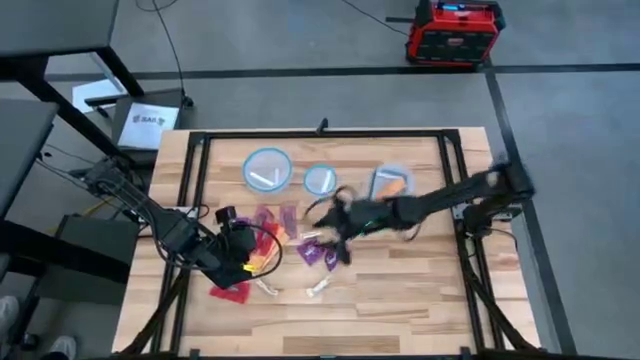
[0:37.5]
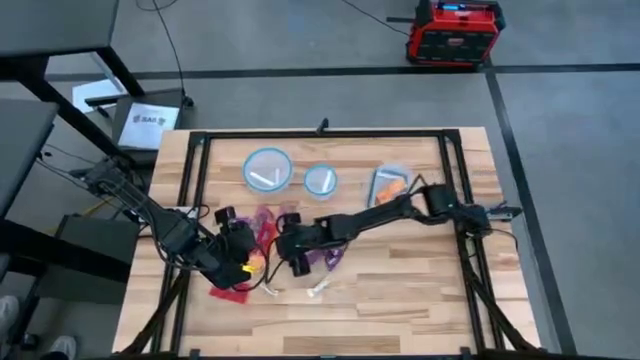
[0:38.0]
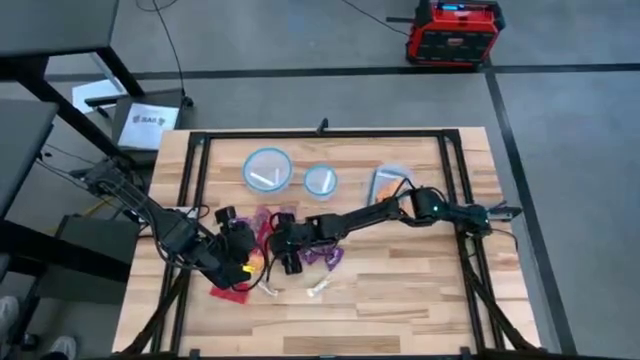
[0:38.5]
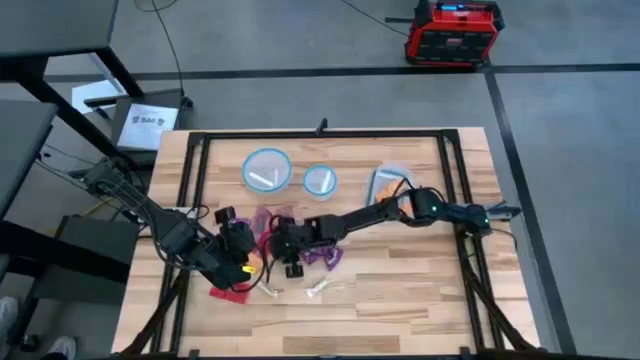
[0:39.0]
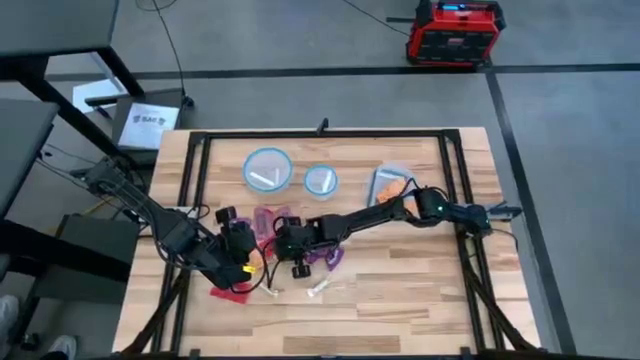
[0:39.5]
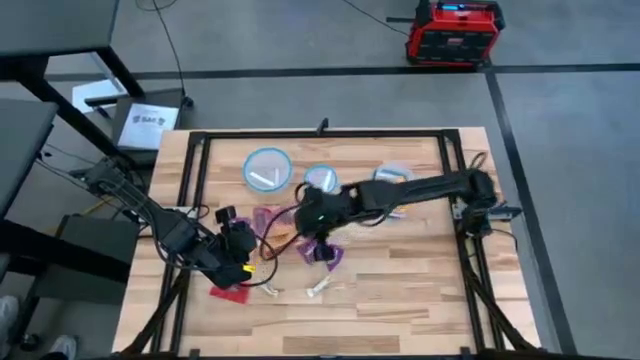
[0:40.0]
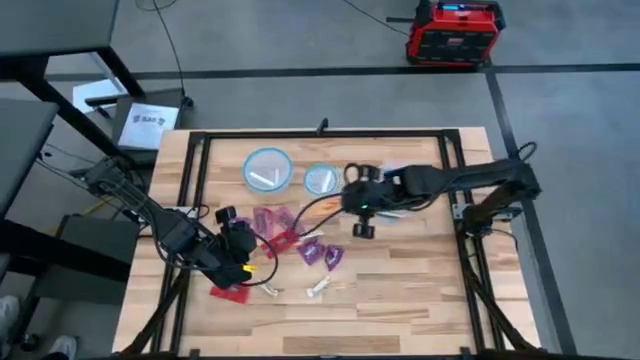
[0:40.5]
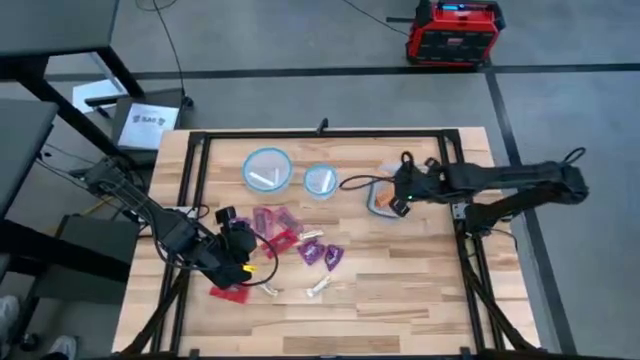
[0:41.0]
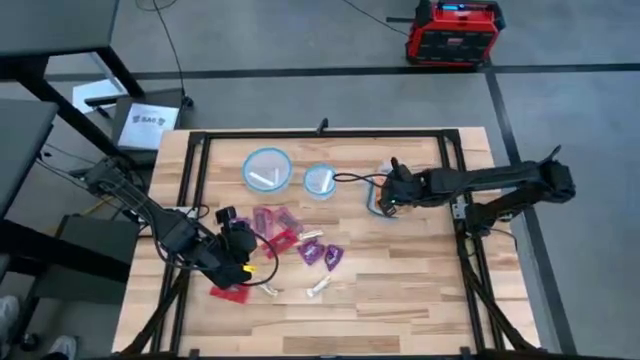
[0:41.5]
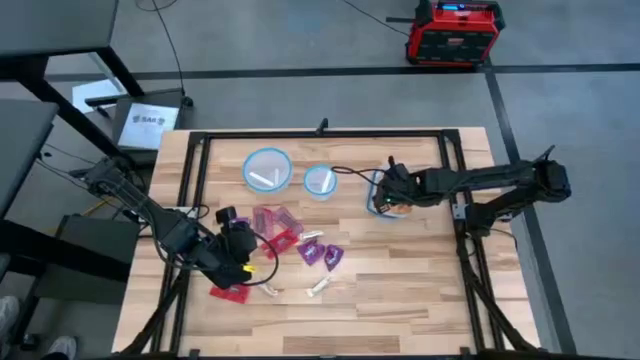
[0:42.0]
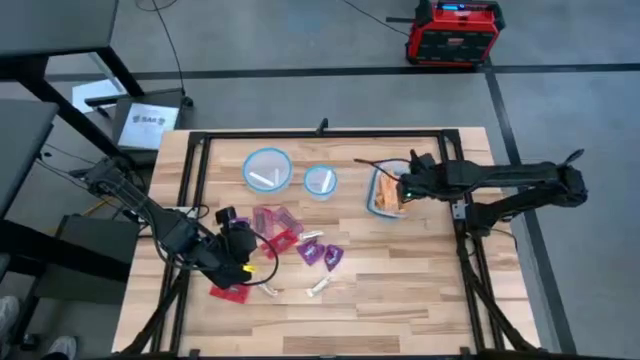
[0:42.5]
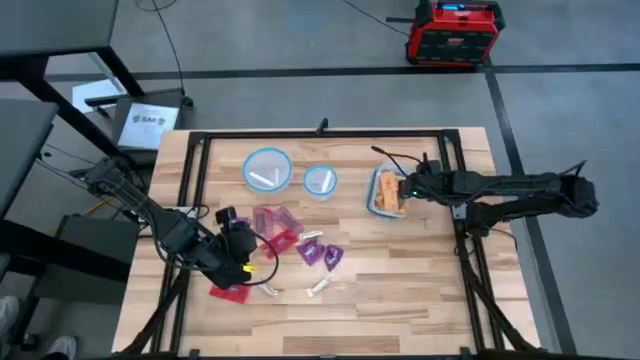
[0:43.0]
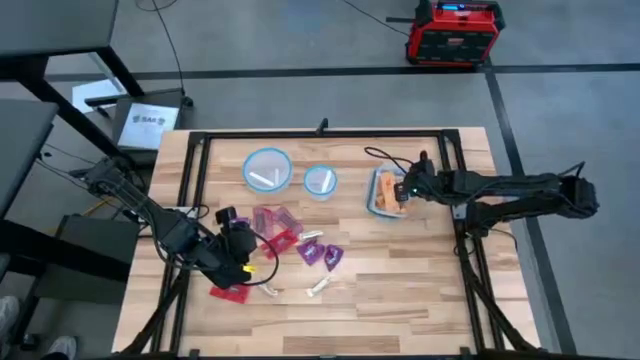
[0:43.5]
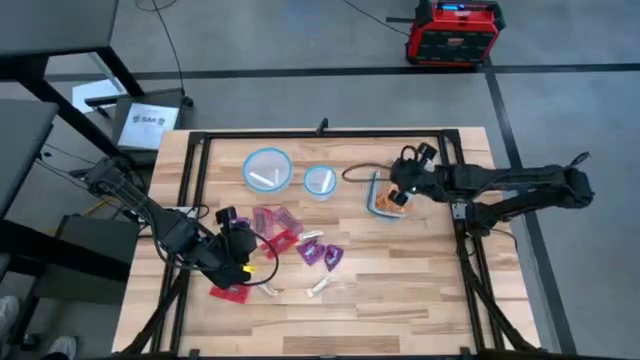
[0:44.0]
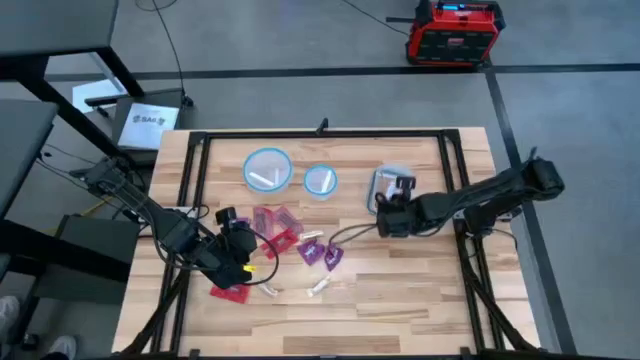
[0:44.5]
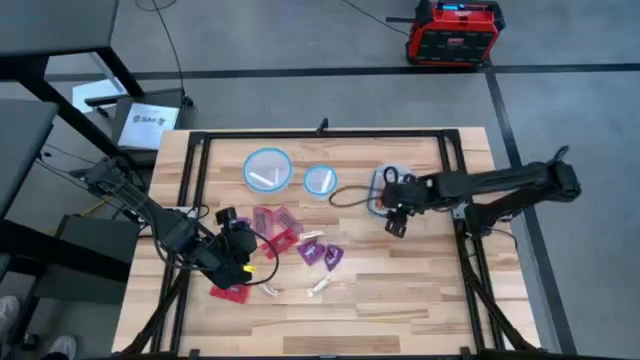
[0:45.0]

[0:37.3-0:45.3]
Task: Sort candy
Put the two orange candies into the top right transparent bin

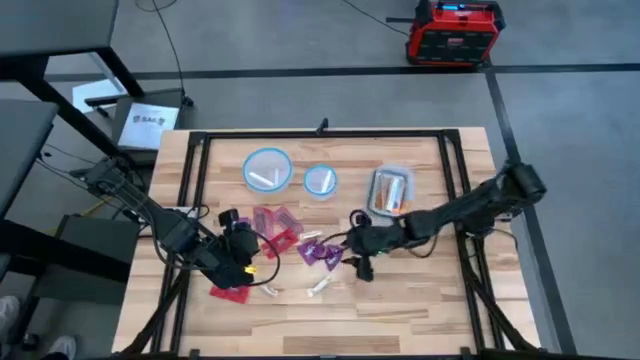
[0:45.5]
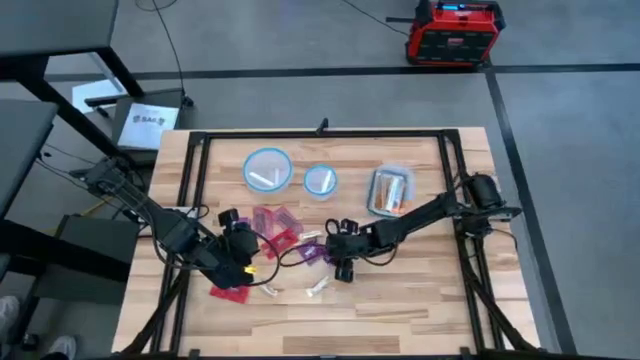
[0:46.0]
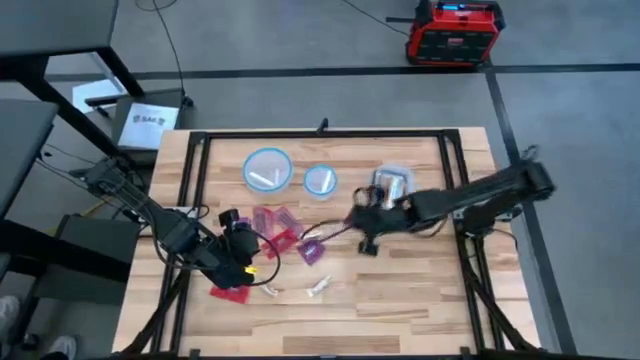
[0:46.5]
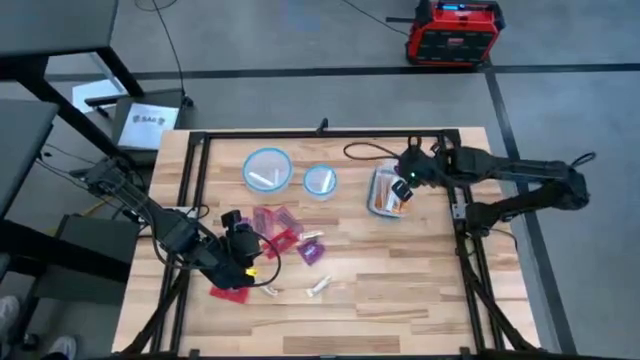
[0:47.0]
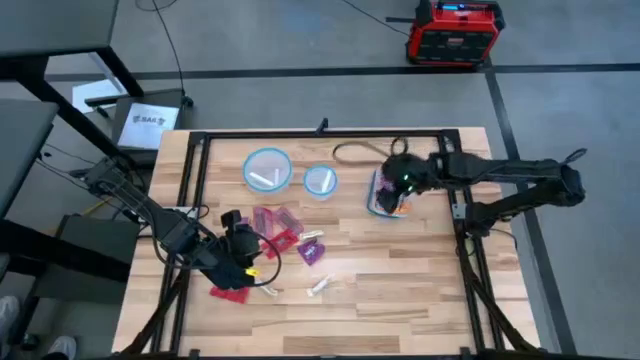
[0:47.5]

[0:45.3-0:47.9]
Put the bottom right violet candy into the top right transparent bin

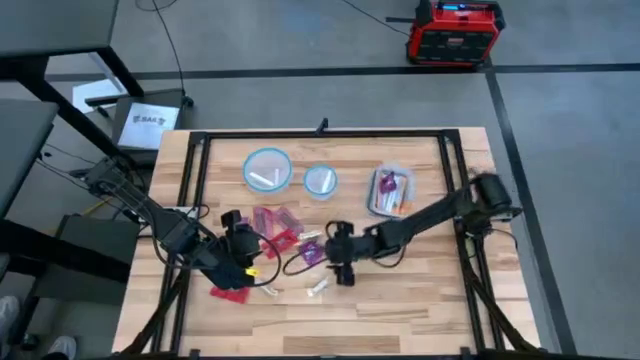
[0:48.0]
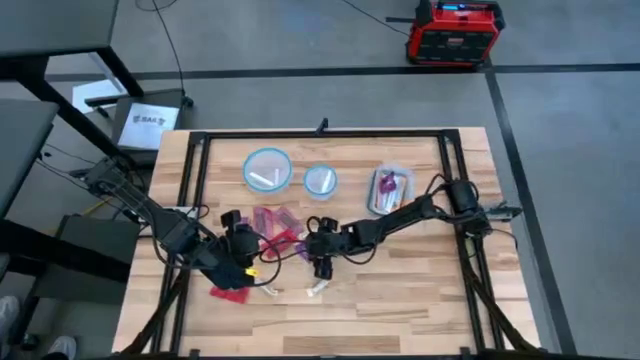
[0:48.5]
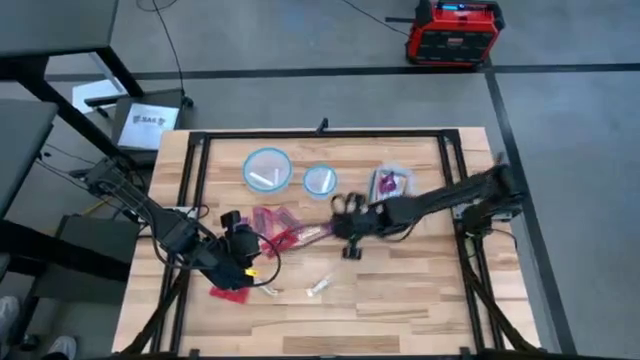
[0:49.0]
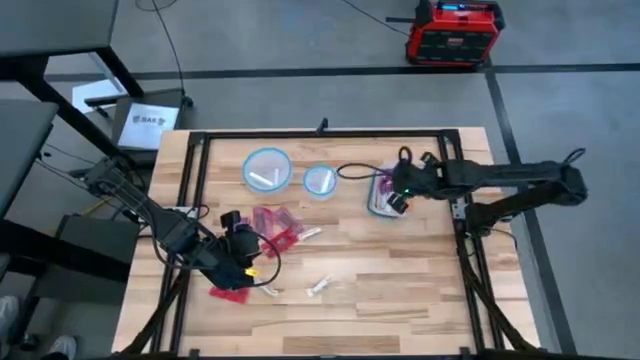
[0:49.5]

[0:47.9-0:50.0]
Put the middle right violet candy into the top right transparent bin

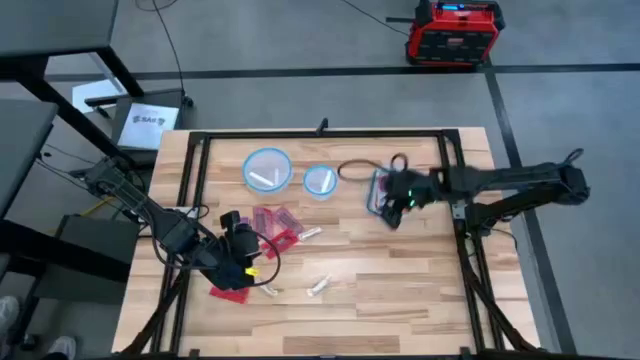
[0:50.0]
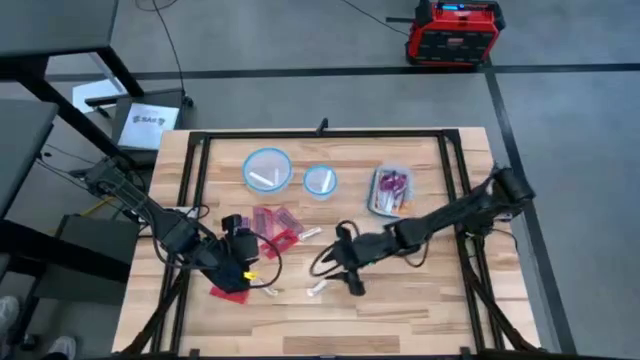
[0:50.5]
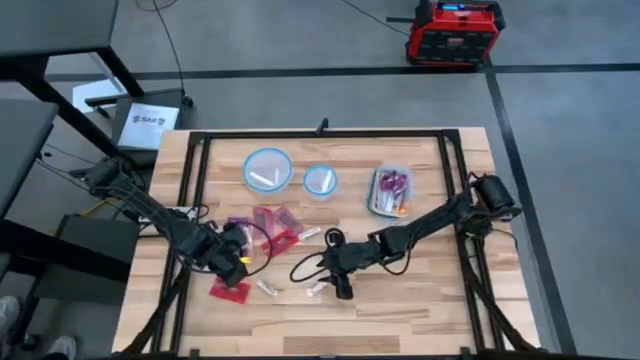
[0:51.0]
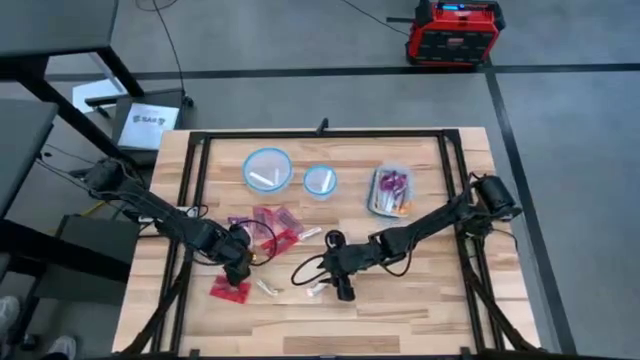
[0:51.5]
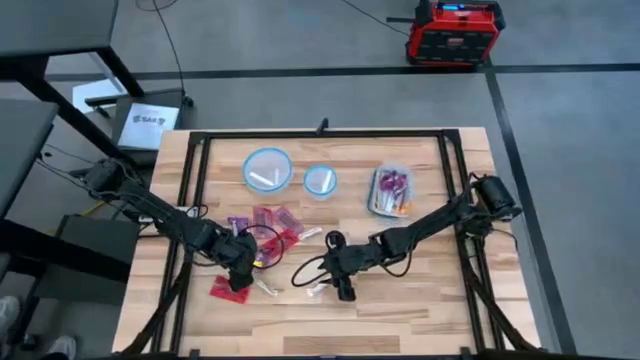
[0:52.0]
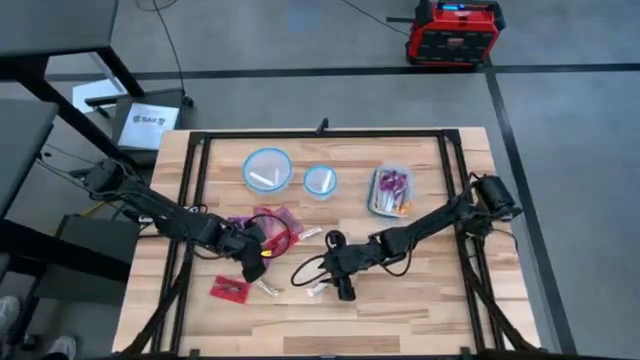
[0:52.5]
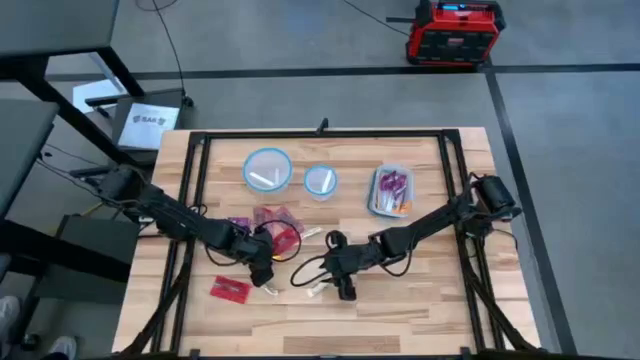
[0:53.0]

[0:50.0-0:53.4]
Put the right violet candy into the top right transparent bin

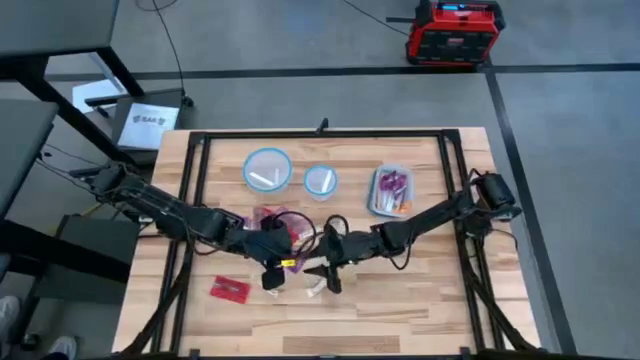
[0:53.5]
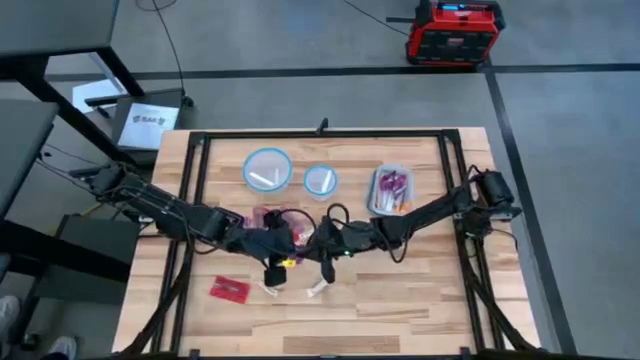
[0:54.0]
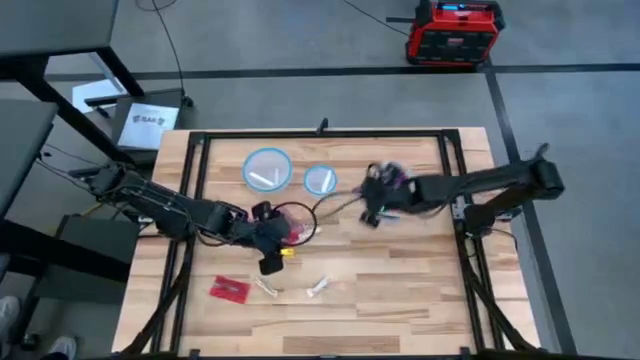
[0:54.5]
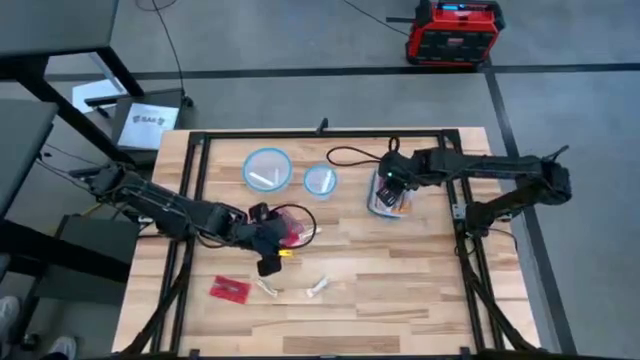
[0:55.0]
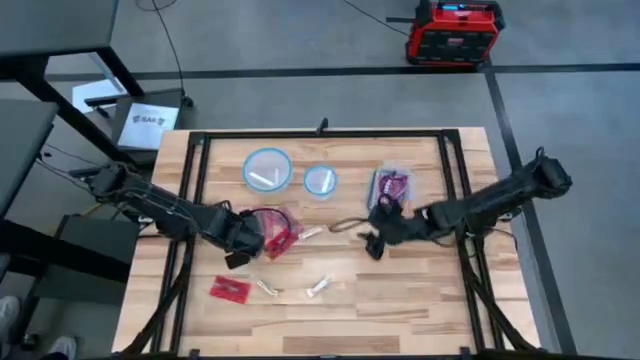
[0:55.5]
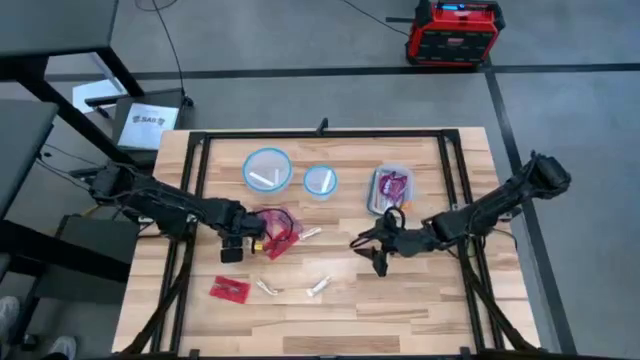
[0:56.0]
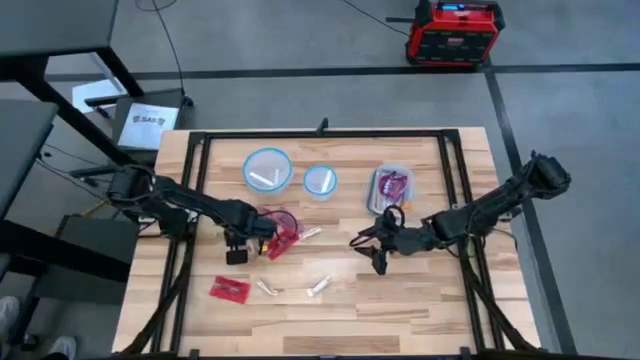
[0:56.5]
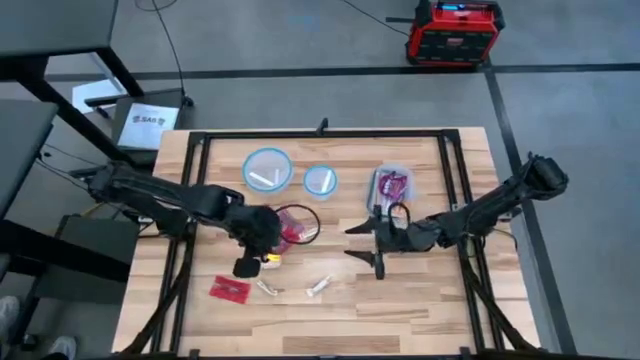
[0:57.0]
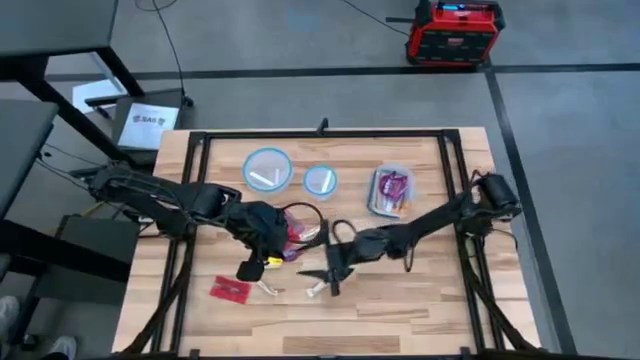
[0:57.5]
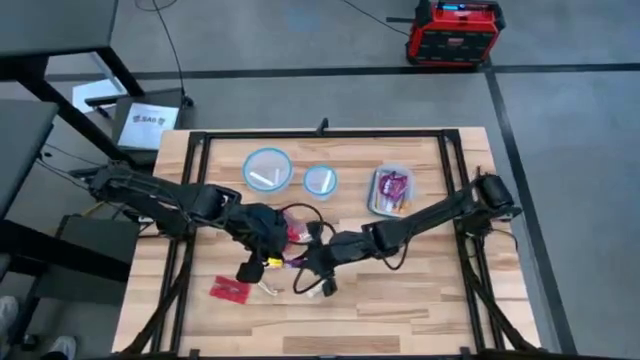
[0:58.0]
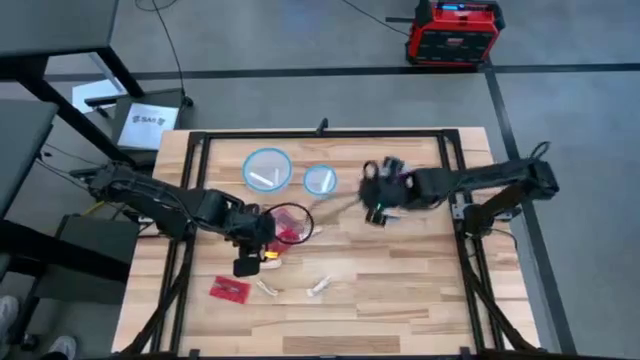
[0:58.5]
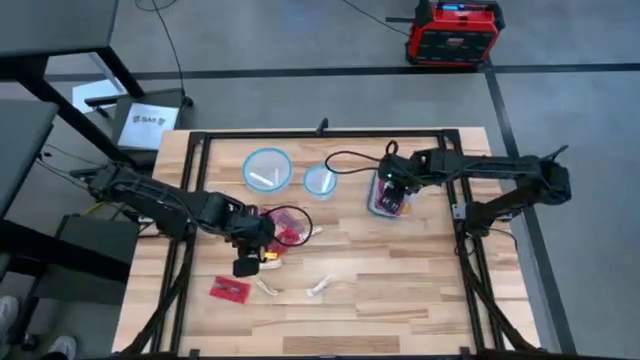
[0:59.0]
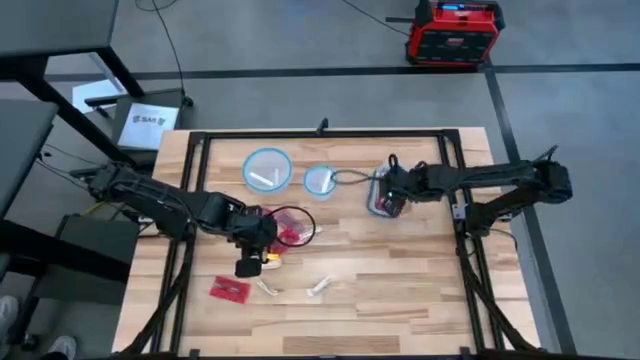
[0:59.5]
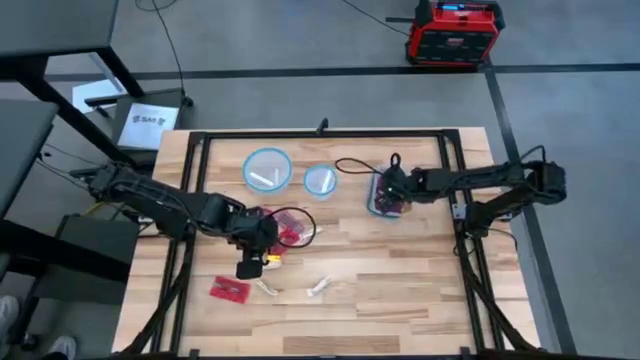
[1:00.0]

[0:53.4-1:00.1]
Put the violet candy into the top right transparent bin
